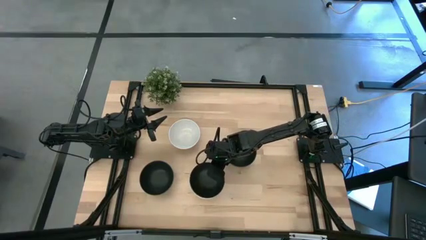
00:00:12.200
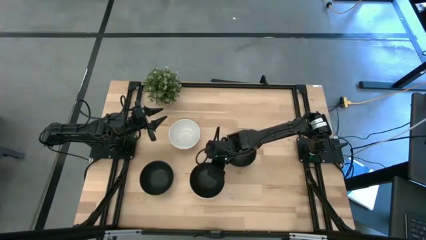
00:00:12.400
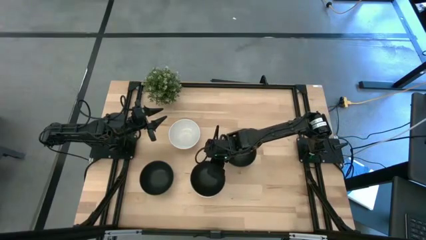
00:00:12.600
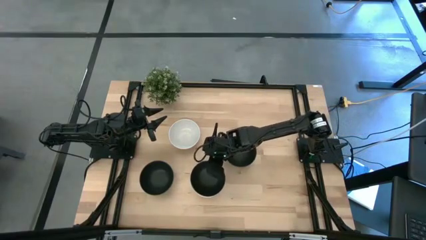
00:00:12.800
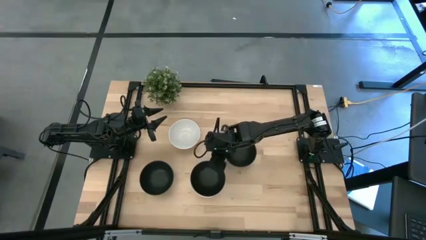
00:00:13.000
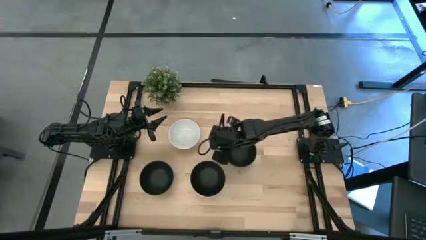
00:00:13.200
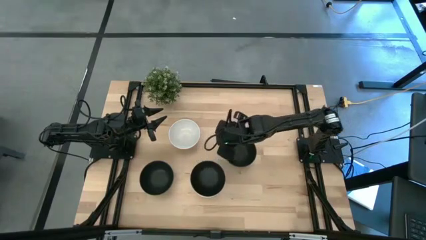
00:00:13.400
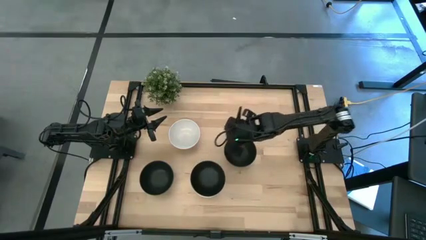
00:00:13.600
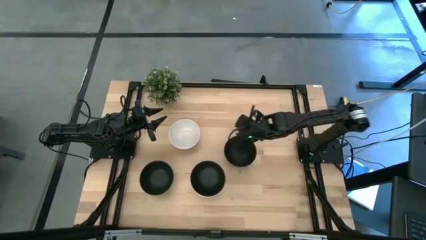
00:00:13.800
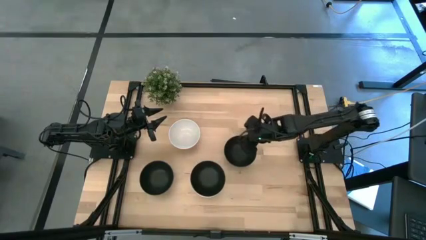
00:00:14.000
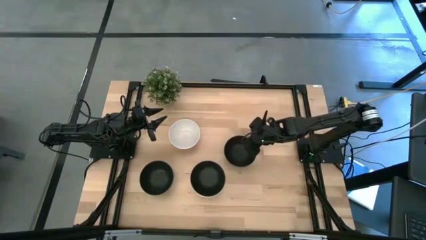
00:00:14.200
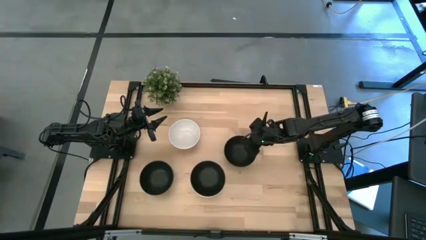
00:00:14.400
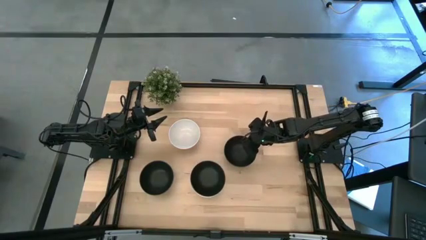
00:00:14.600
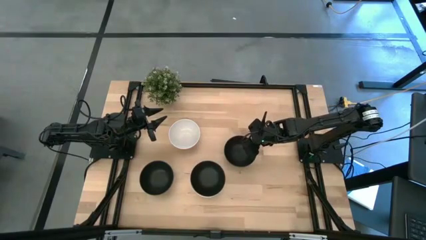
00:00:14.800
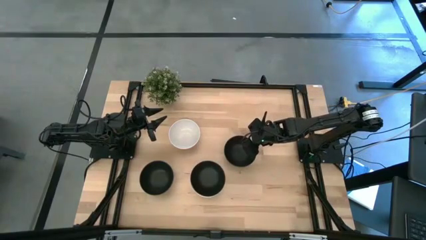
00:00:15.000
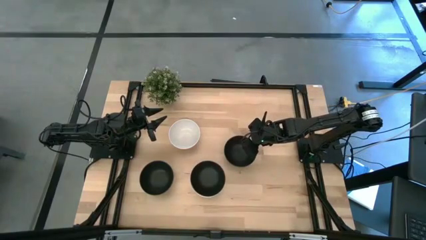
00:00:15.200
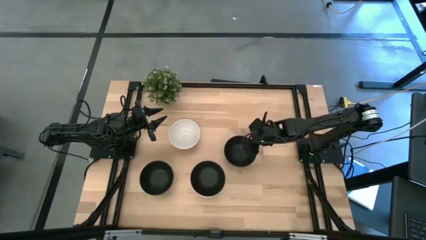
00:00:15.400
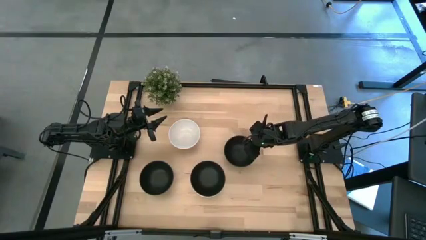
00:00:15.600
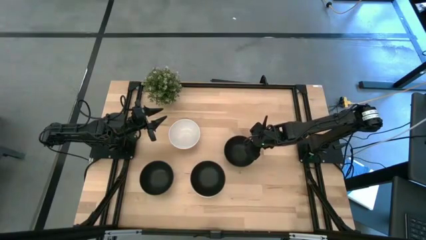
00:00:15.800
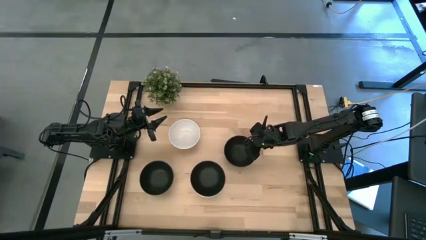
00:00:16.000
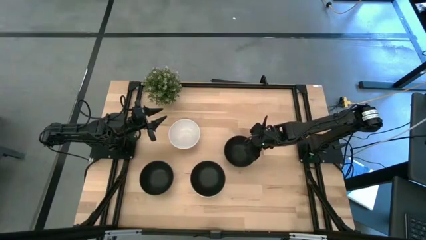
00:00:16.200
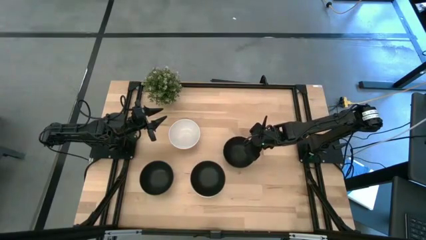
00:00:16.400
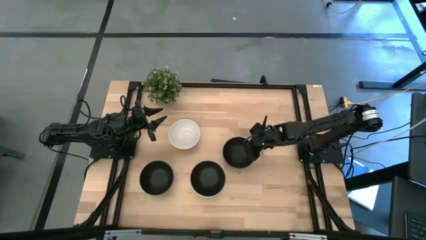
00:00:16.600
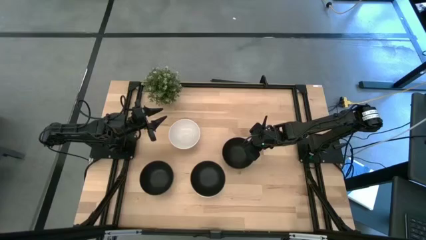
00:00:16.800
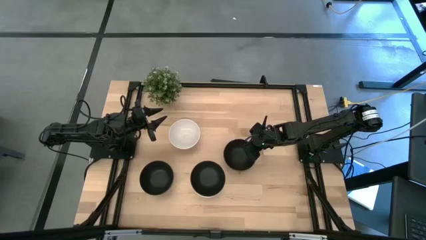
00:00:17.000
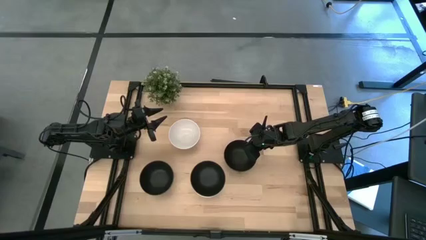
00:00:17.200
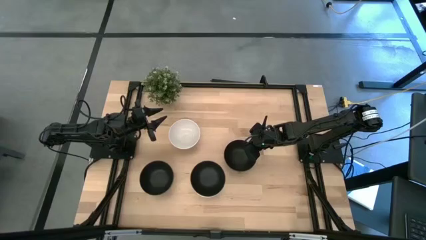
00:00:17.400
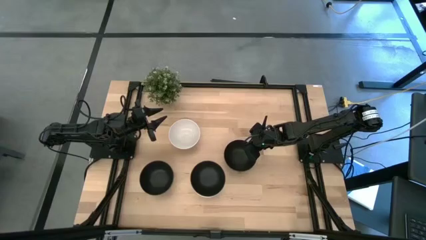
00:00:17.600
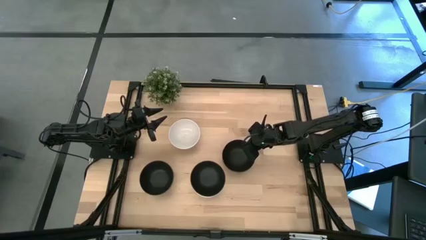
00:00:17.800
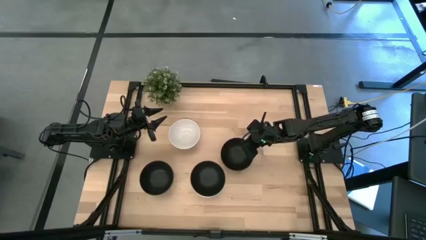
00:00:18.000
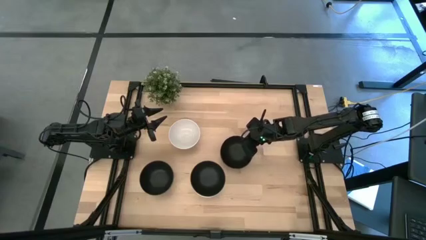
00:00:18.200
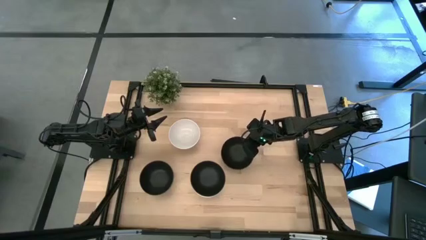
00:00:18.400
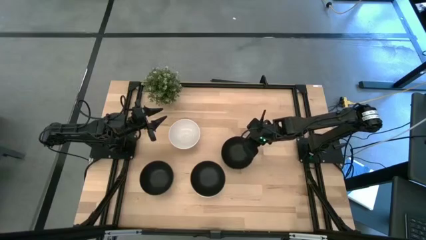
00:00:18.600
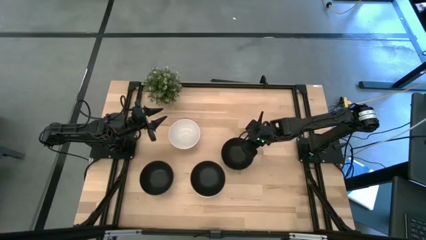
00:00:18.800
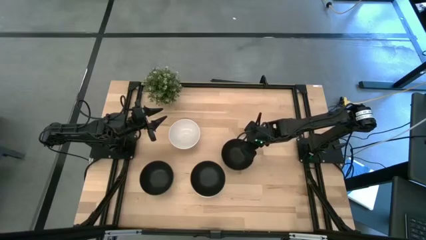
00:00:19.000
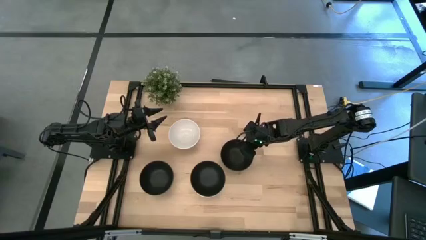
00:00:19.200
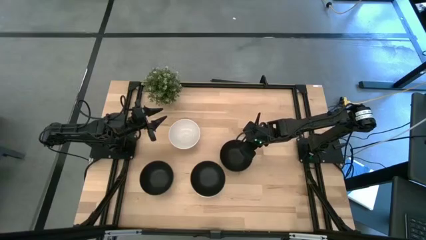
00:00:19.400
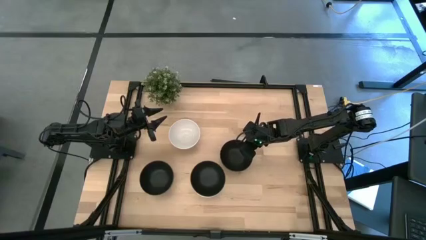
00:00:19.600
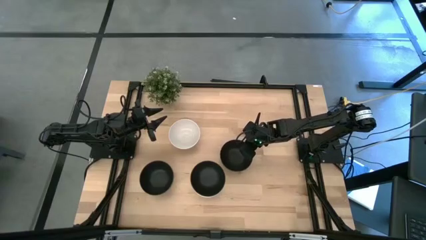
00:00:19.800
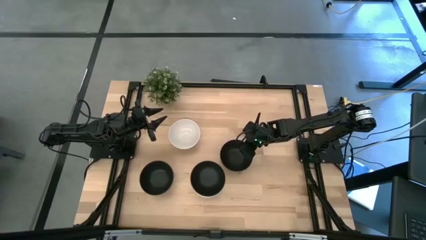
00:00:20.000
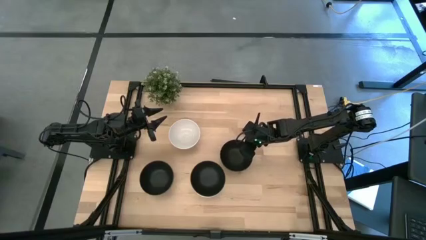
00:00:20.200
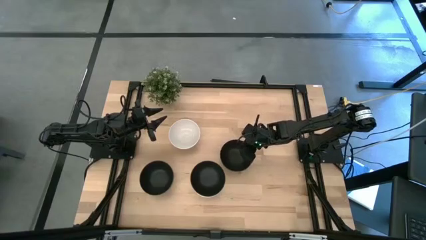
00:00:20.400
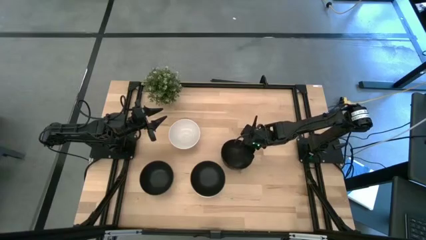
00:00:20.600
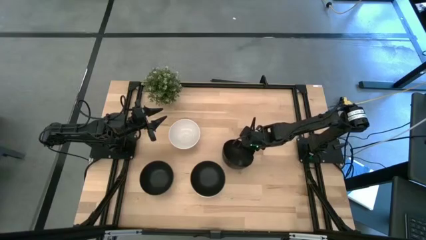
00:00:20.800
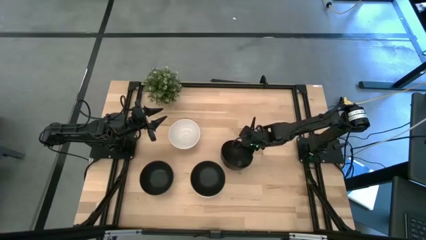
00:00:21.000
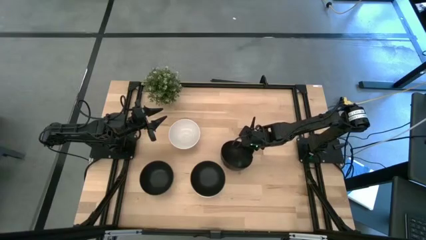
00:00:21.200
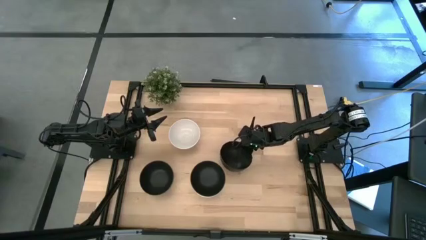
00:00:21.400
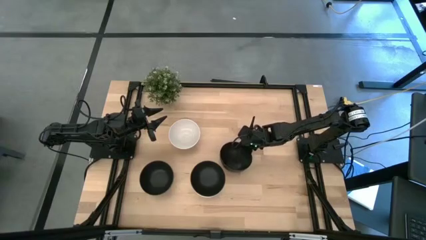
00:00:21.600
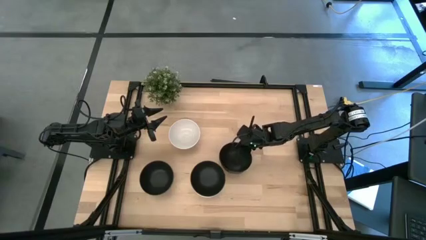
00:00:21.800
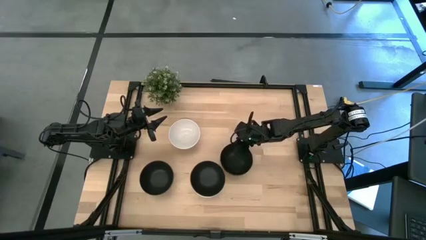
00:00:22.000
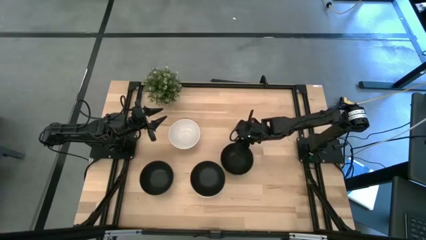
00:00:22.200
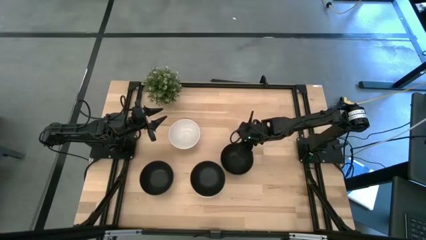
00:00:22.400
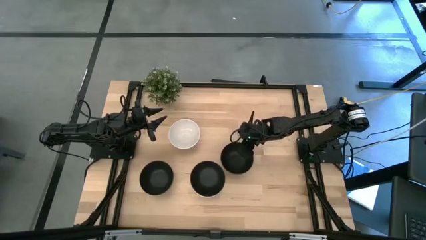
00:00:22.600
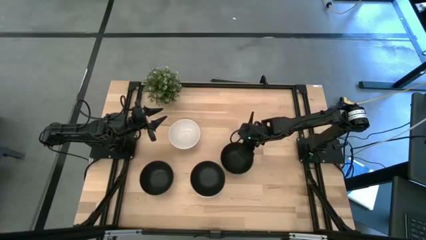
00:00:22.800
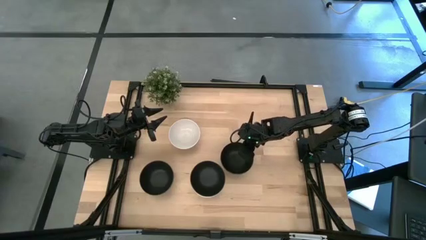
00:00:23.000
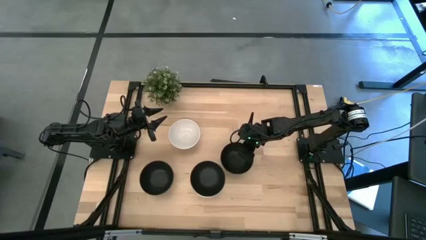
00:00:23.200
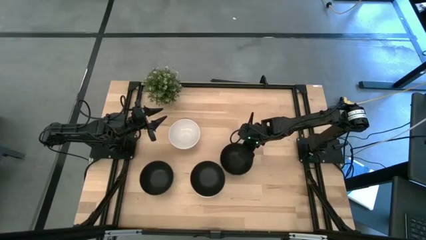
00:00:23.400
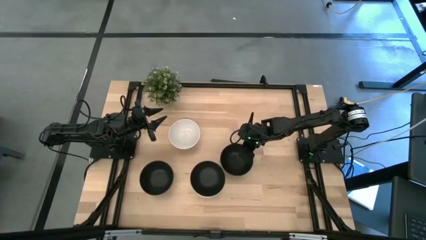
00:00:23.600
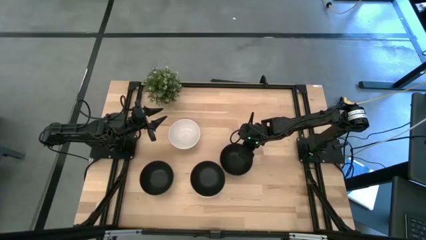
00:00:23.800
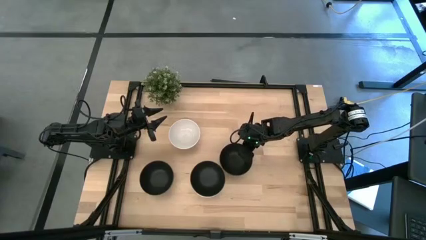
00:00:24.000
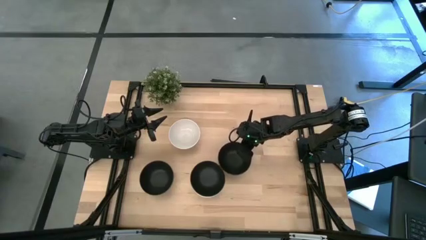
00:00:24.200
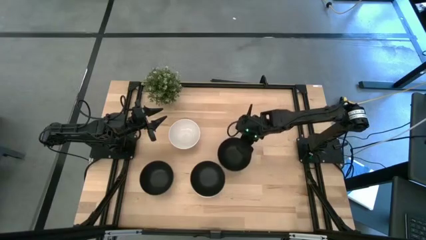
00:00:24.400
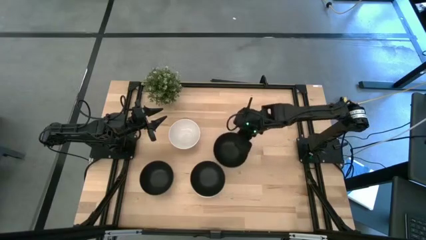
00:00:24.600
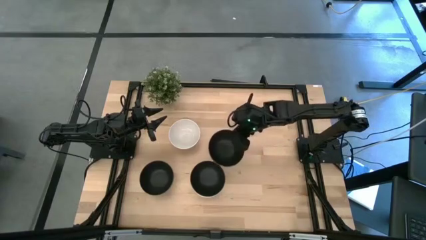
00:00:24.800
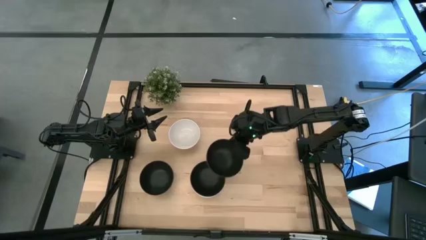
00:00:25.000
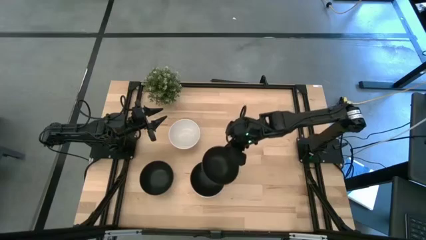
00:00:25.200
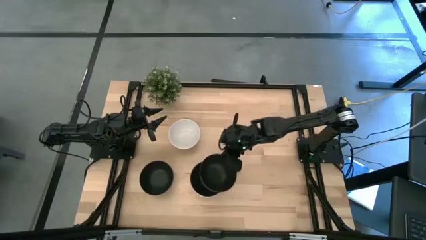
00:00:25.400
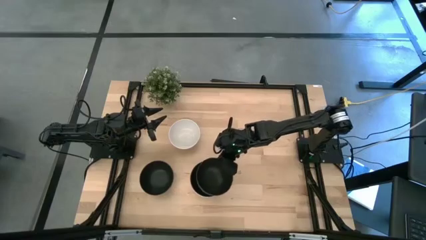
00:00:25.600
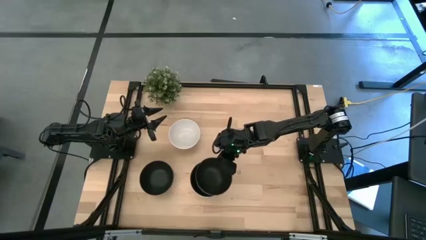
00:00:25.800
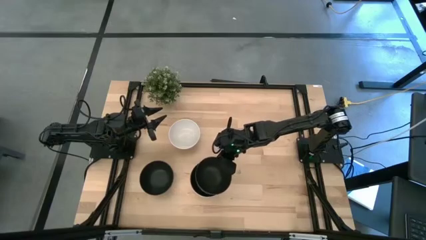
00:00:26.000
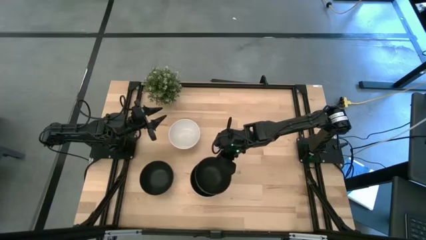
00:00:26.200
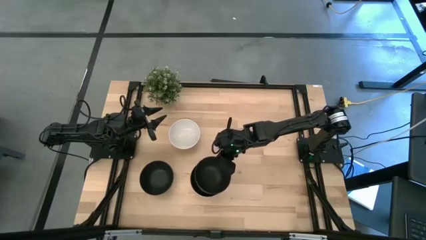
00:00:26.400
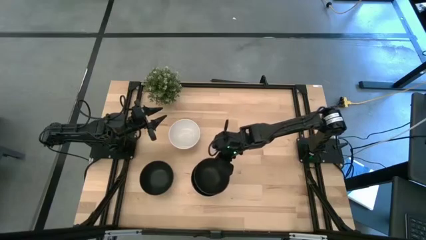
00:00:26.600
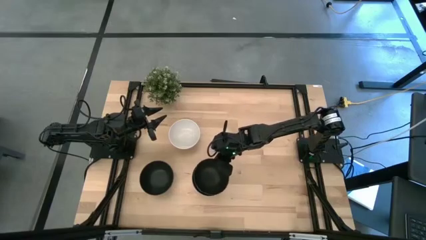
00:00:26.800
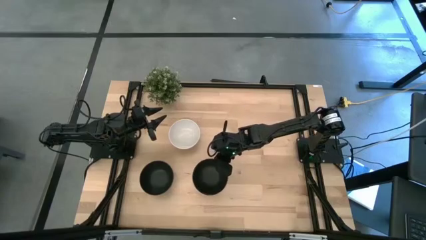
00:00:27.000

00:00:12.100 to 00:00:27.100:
Task: Nest bowls inside each other
Stack the top black bowl on the bottom right stacked black bowl
